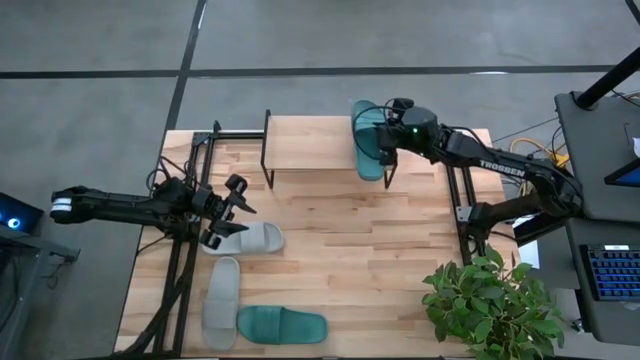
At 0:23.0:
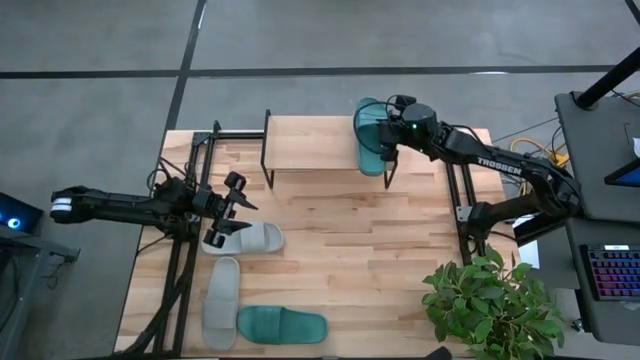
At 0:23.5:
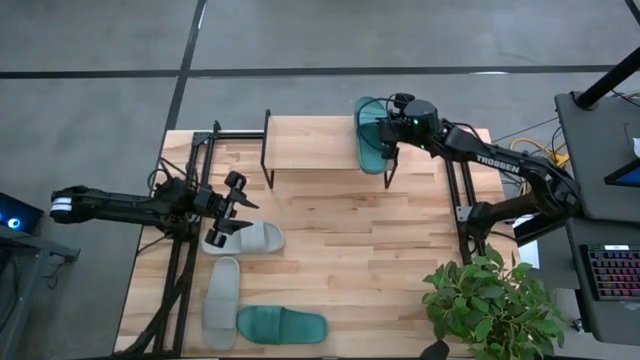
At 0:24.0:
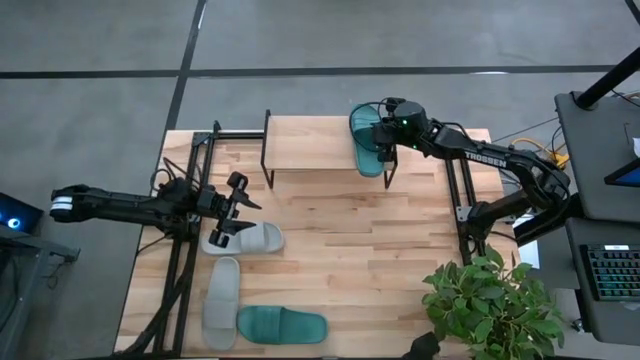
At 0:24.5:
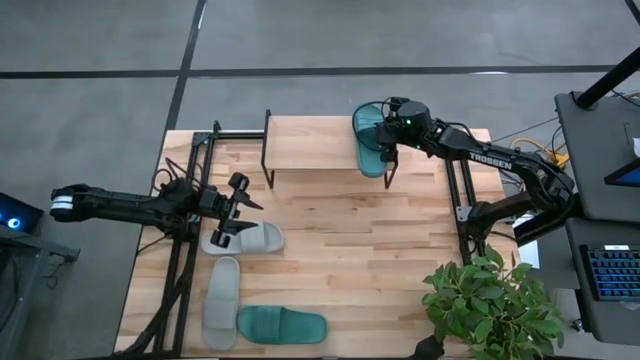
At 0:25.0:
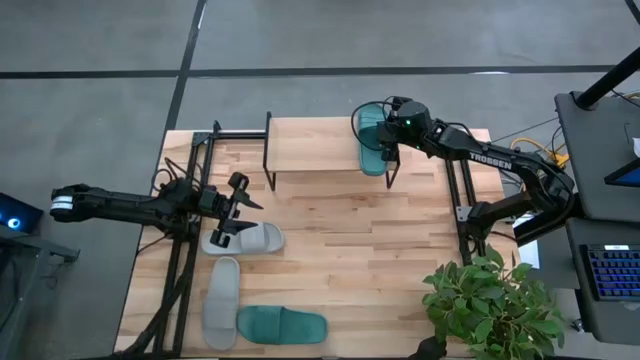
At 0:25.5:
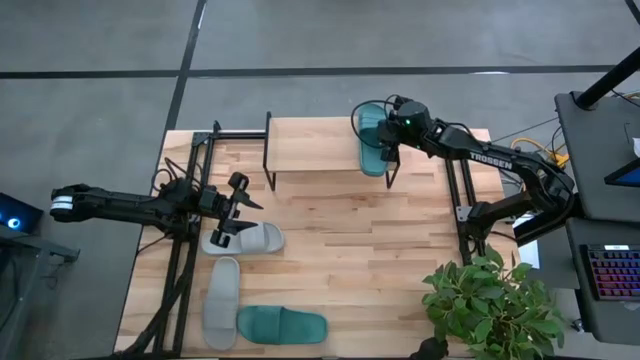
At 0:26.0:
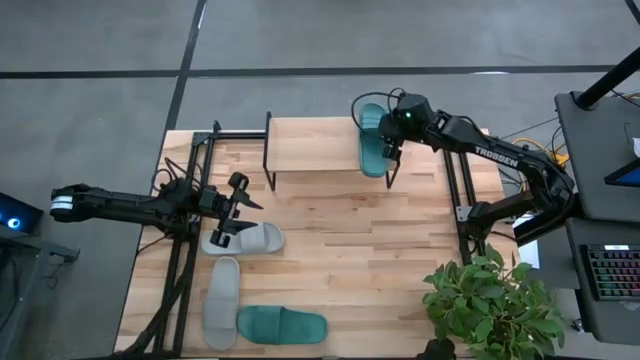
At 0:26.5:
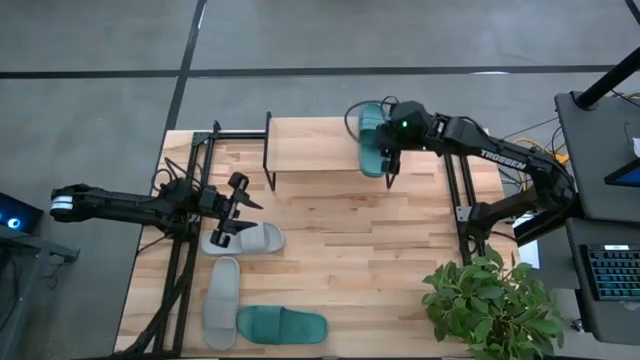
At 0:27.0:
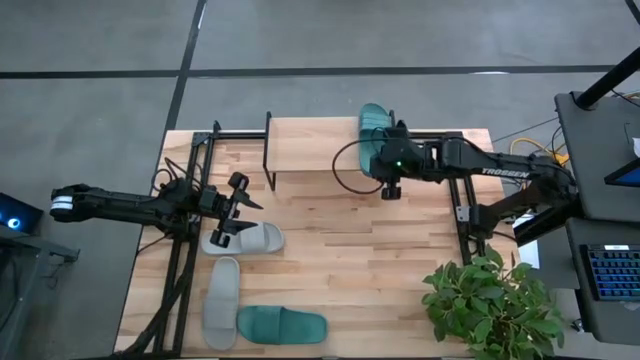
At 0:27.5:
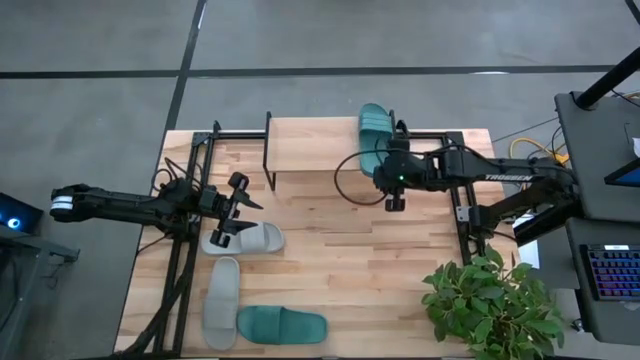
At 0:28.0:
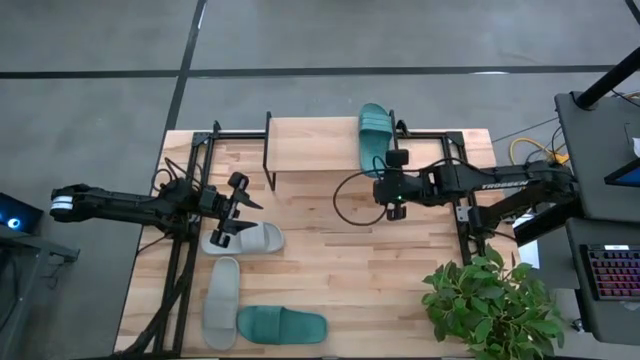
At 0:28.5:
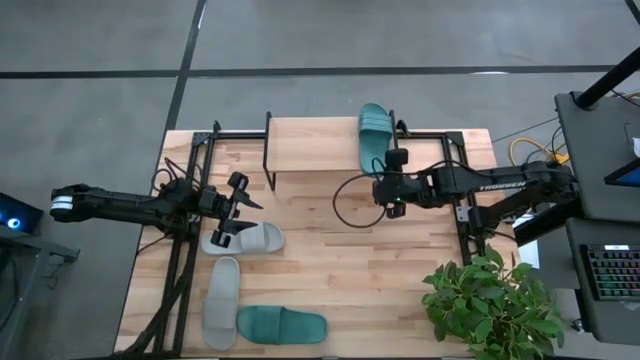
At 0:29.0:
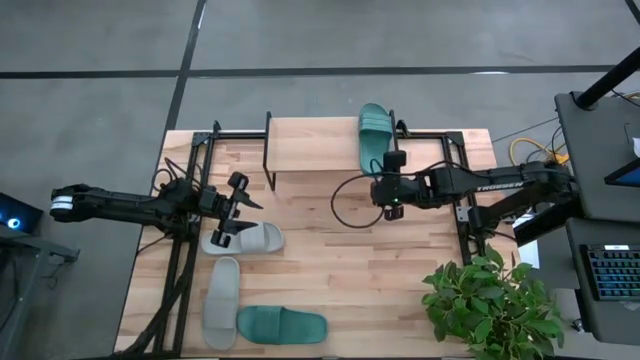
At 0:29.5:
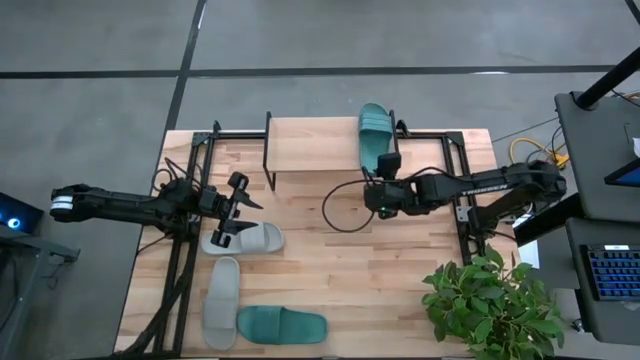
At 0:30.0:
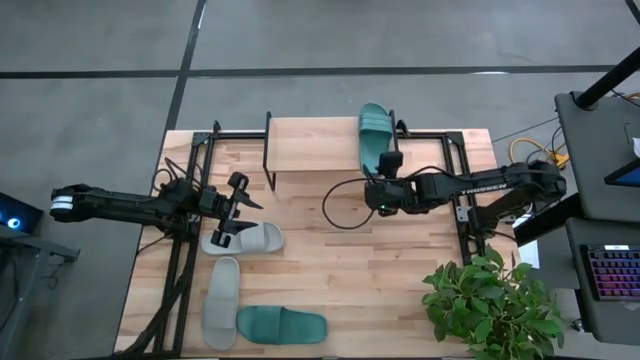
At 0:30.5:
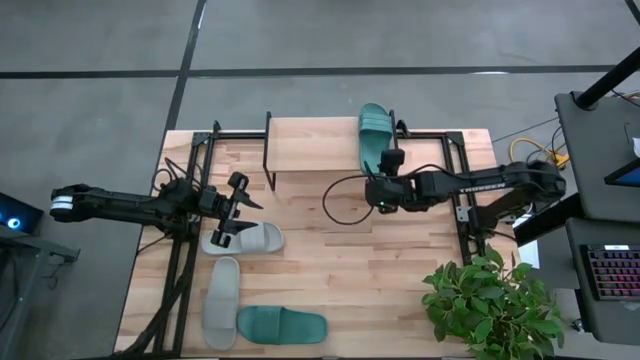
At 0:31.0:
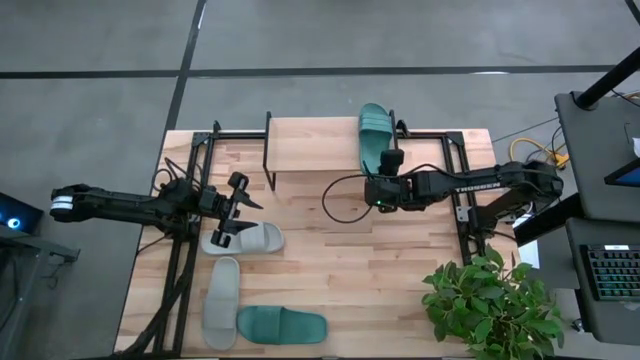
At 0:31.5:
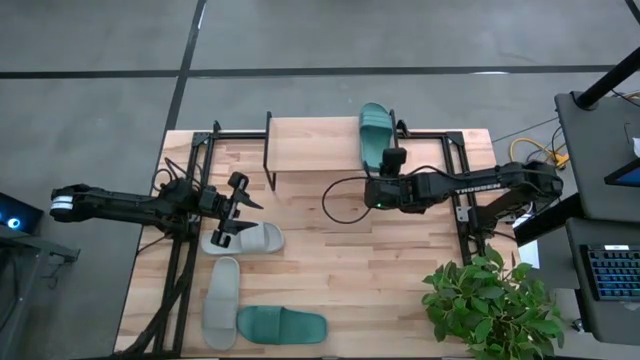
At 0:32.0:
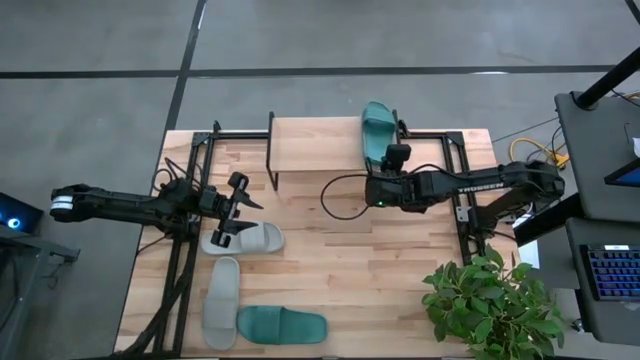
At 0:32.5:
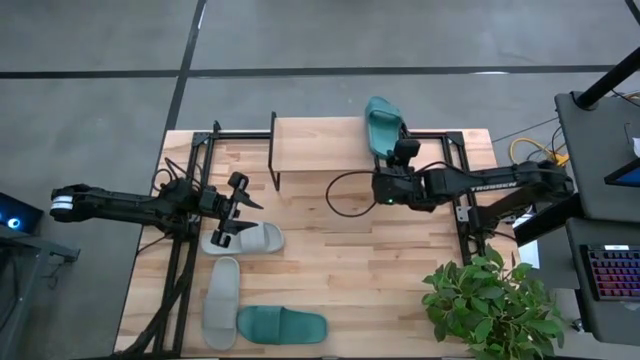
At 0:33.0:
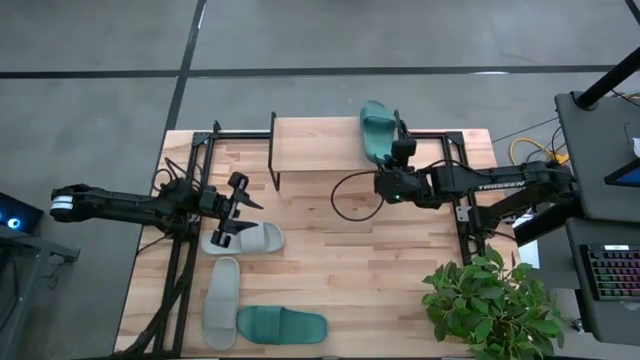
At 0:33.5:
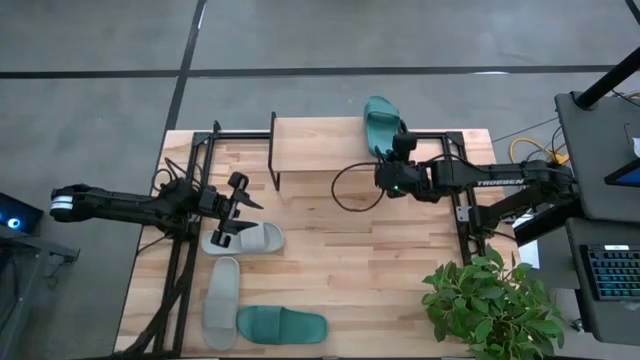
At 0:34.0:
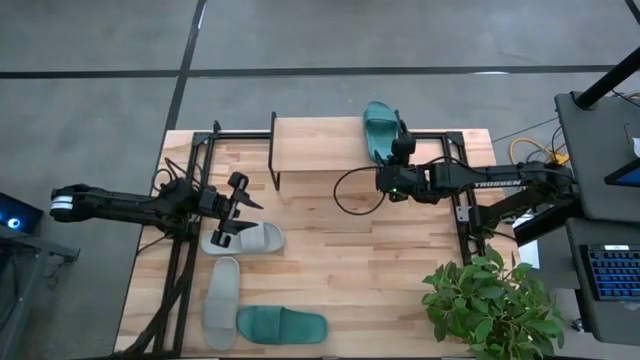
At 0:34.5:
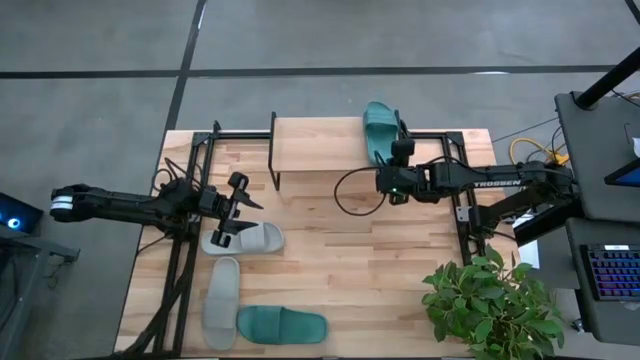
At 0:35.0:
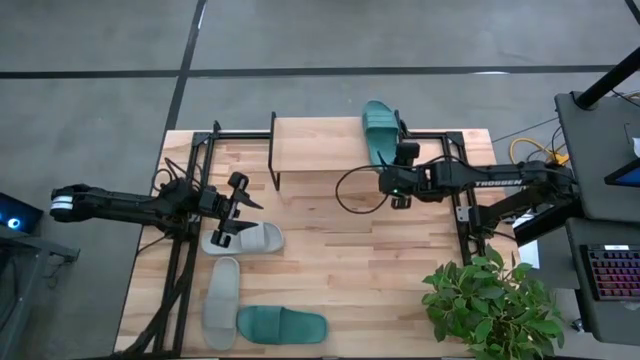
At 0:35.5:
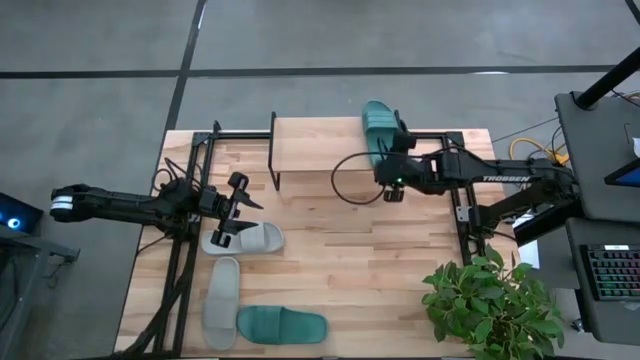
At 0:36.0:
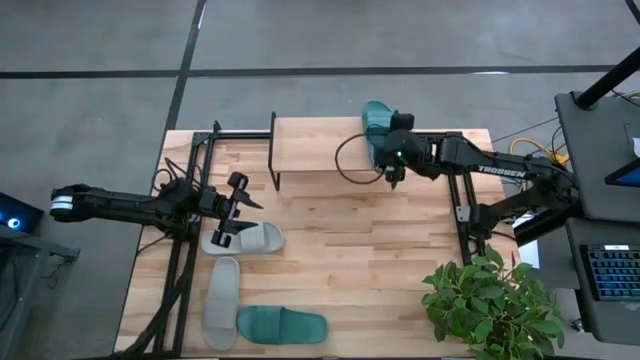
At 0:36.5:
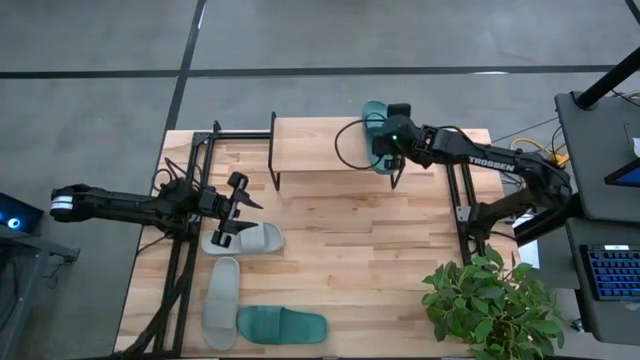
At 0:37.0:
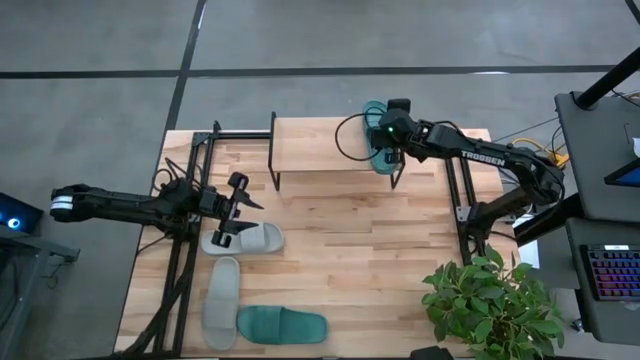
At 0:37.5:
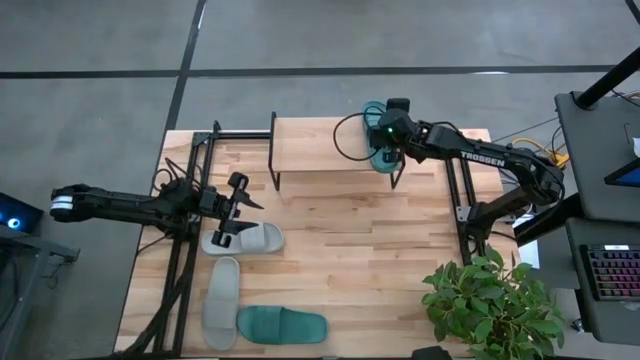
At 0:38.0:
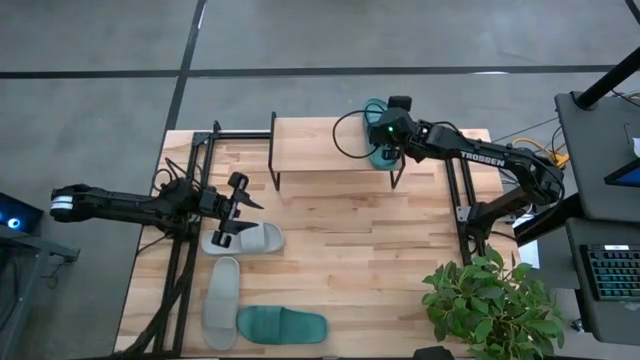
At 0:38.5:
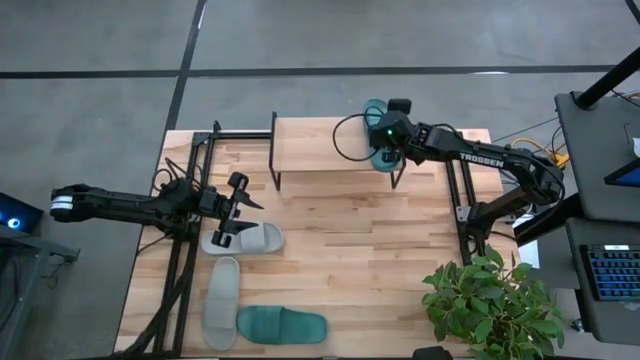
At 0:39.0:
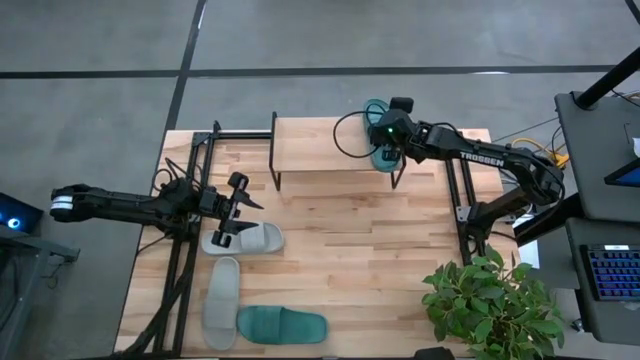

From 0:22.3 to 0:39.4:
Task: Pick and place slides into the shelf
Put the top green slide on the shelf

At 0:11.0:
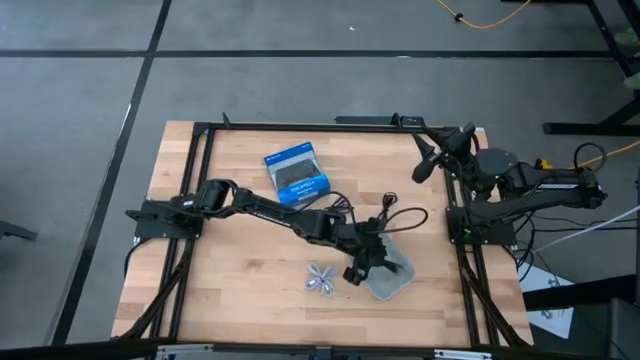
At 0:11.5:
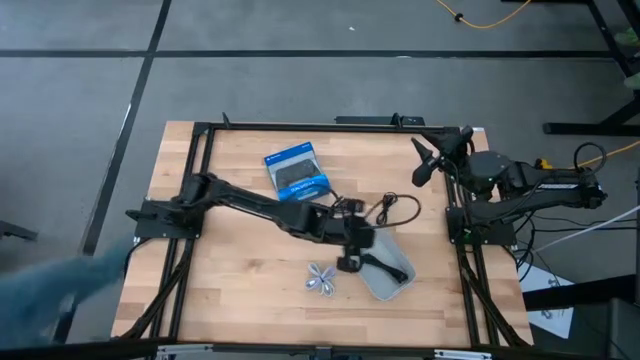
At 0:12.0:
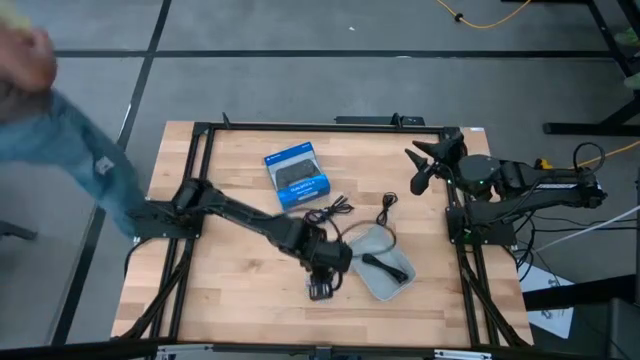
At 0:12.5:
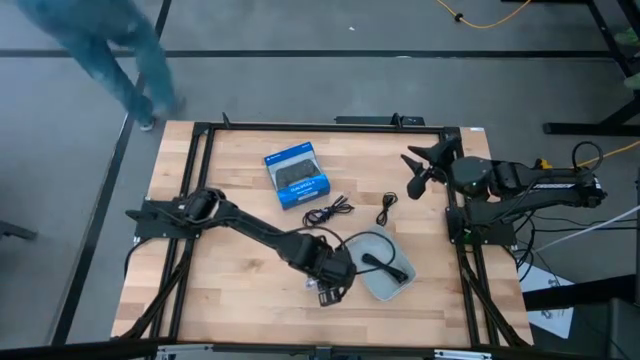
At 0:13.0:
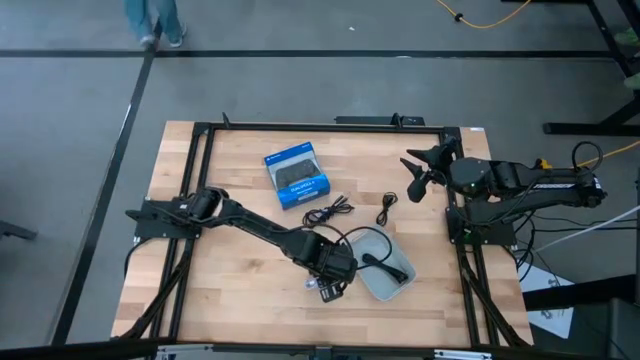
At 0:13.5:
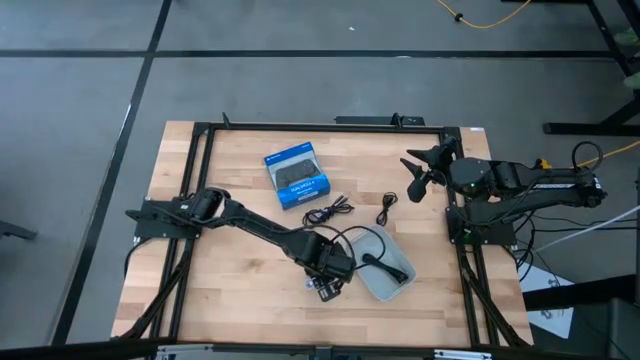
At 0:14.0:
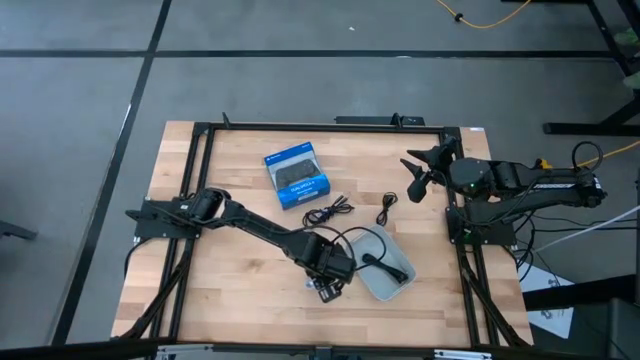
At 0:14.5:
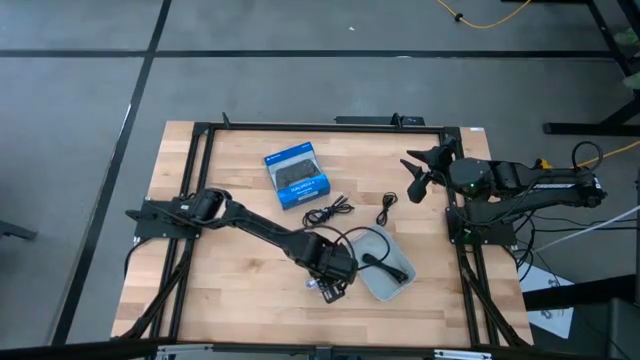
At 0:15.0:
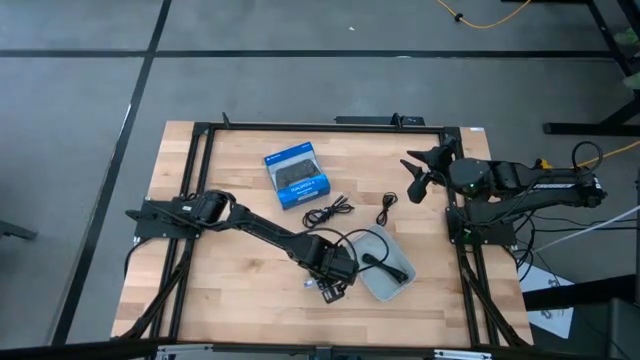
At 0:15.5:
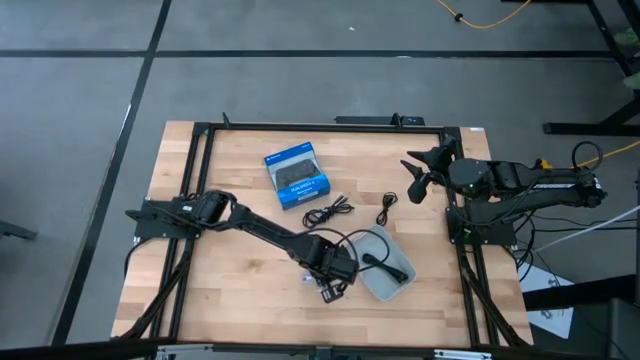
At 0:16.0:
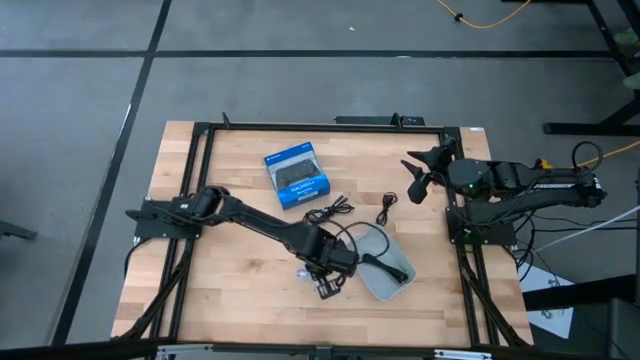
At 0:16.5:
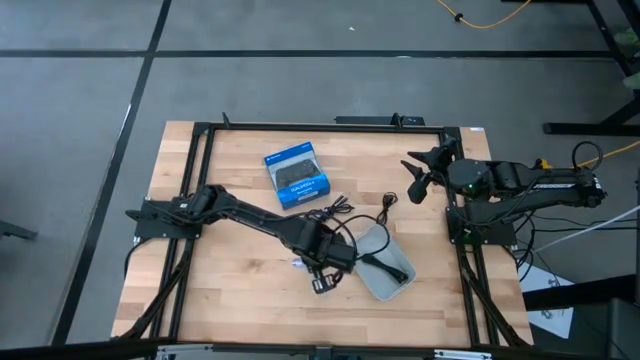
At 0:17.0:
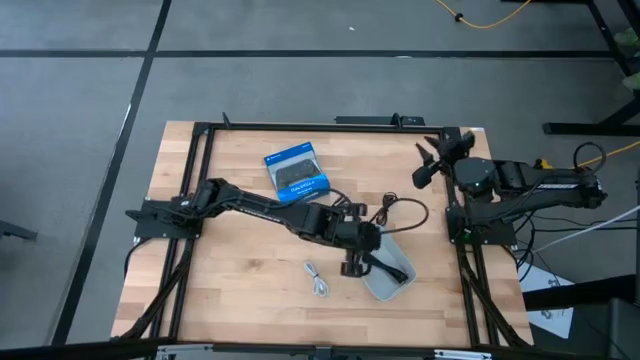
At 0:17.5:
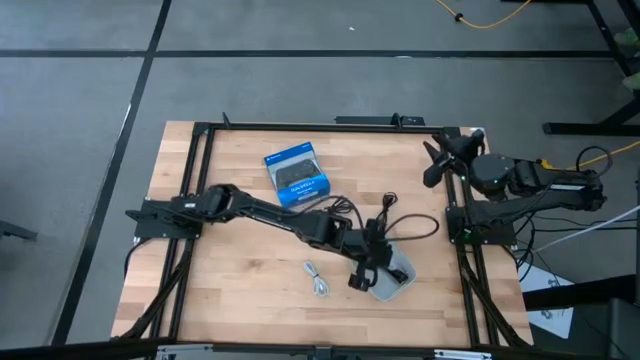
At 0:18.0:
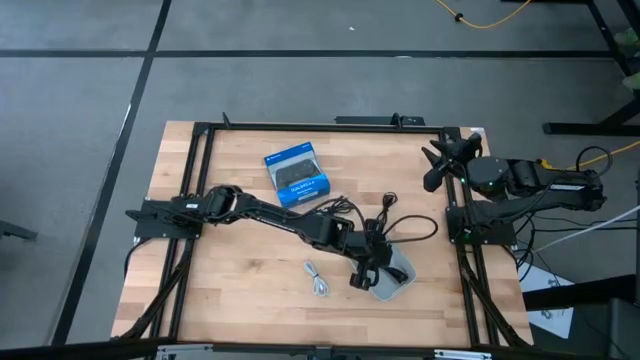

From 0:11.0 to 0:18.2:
Task: Pick and place USB-C Cables
Put the gray charger cable into the white bin
